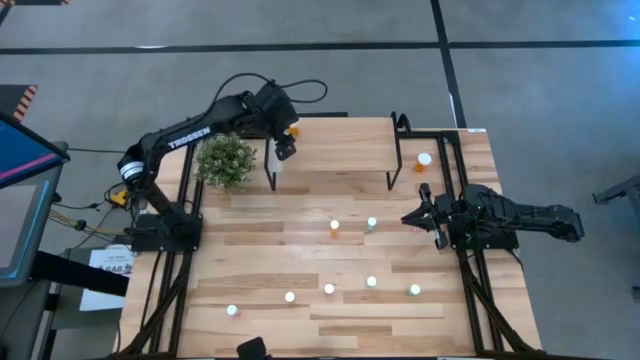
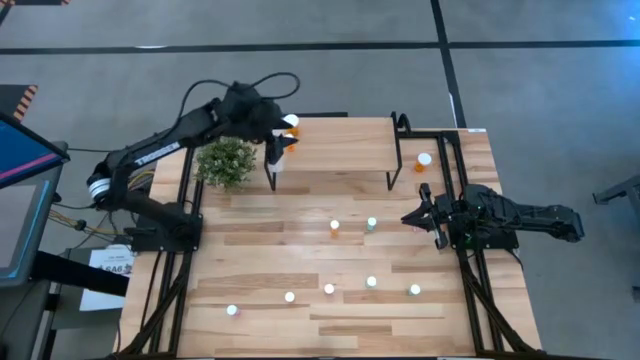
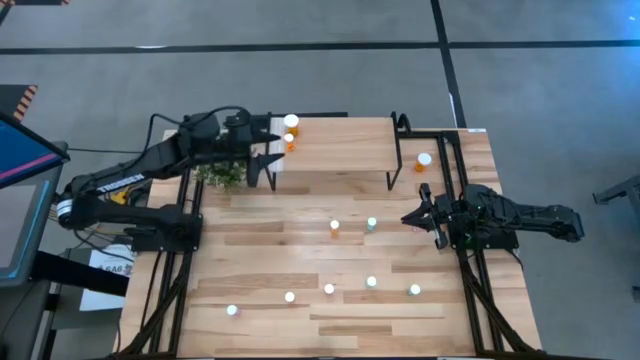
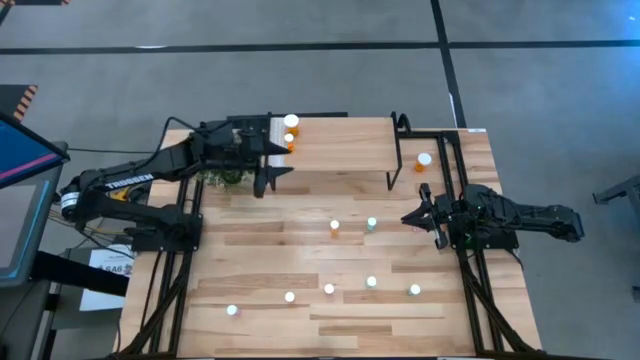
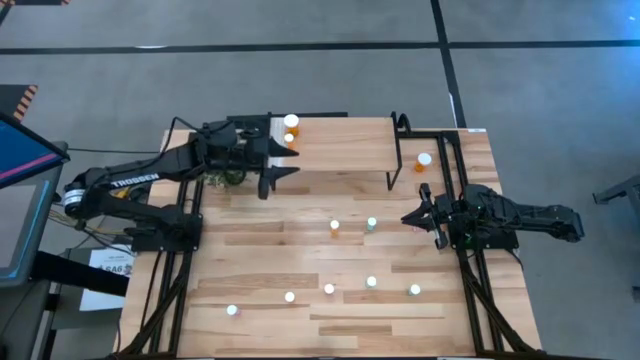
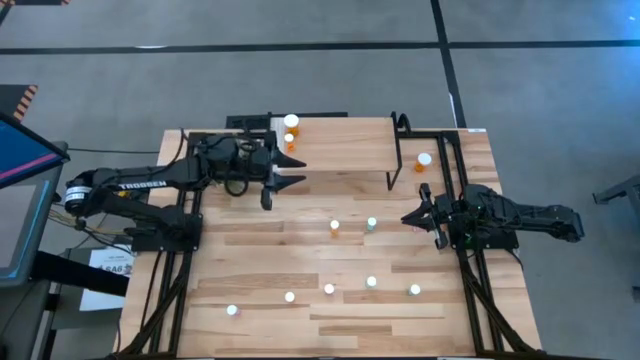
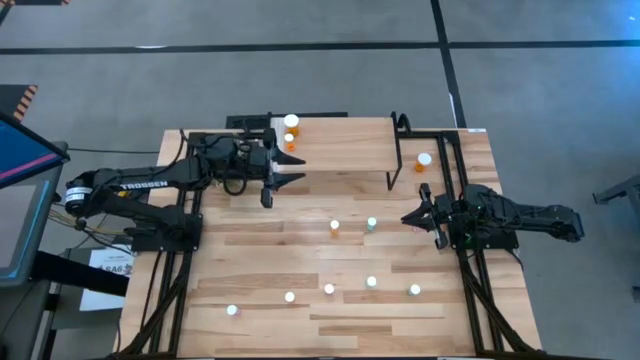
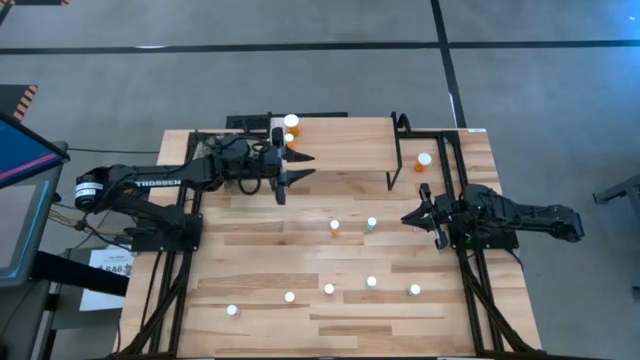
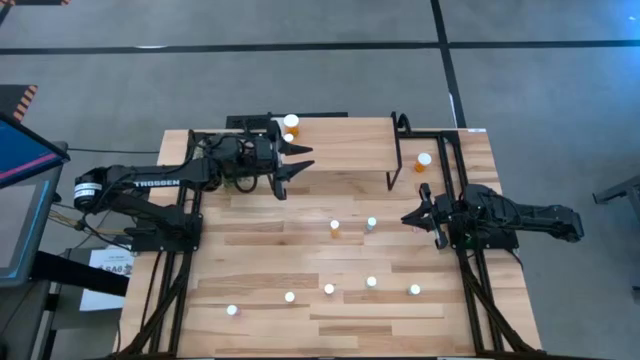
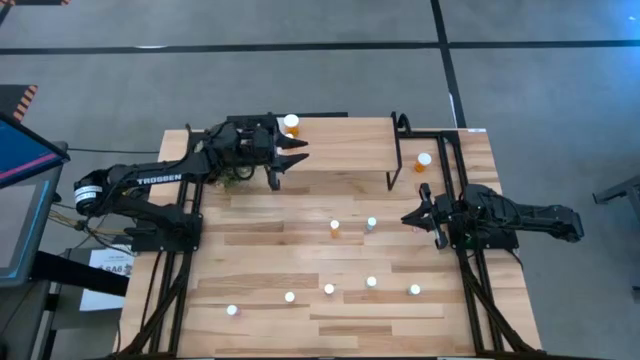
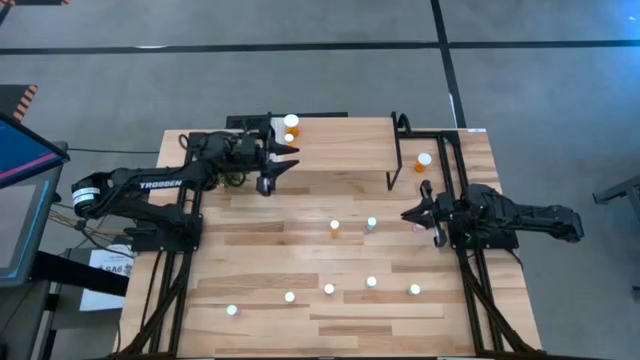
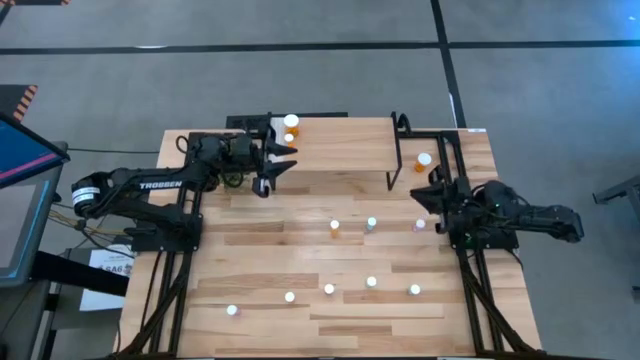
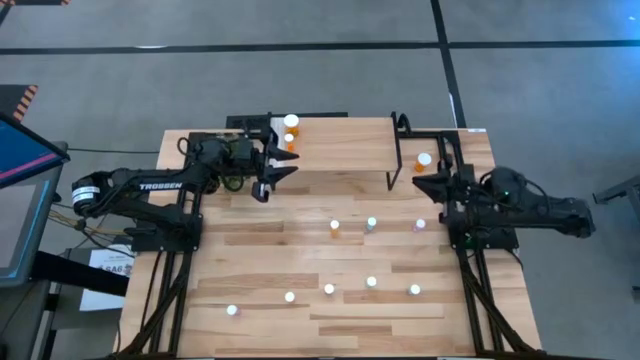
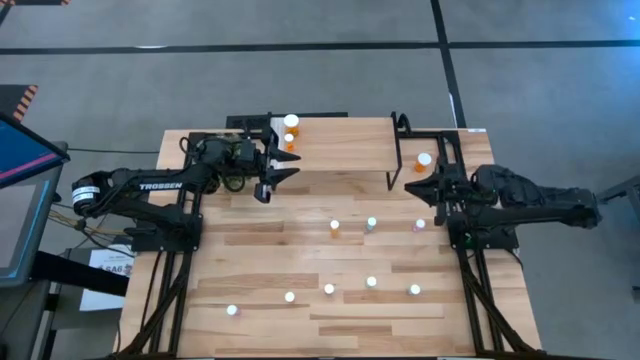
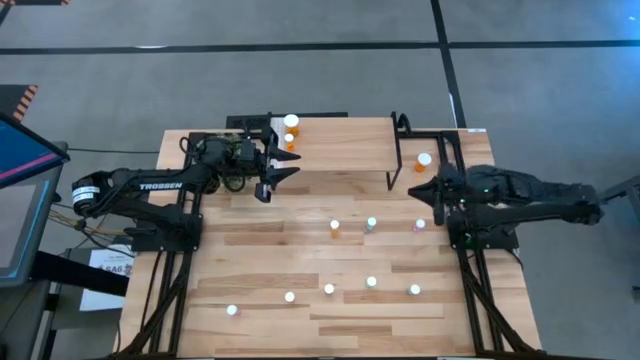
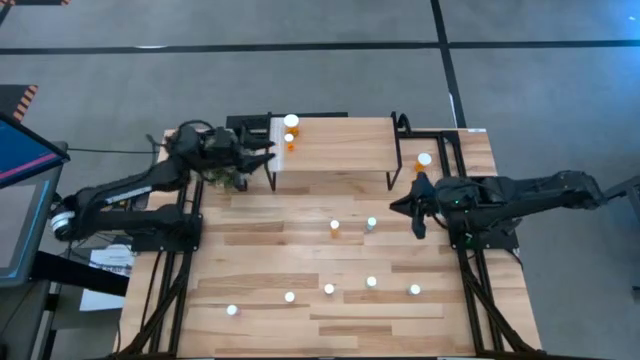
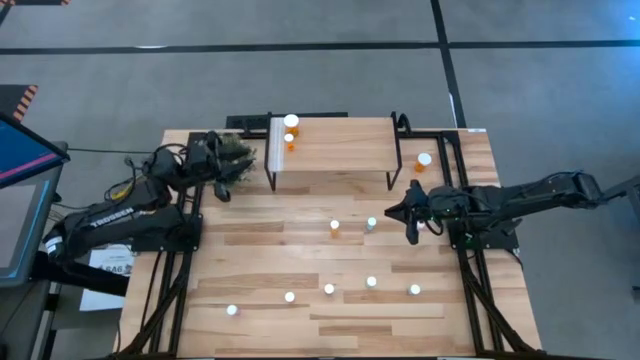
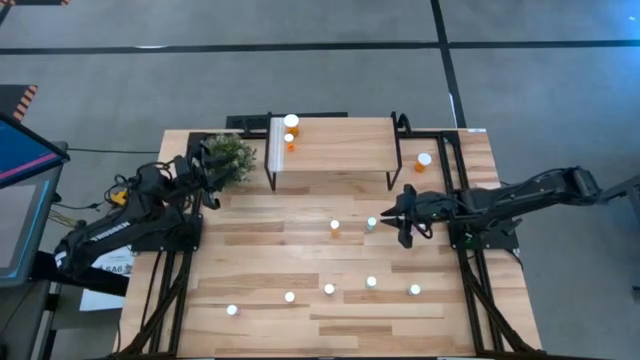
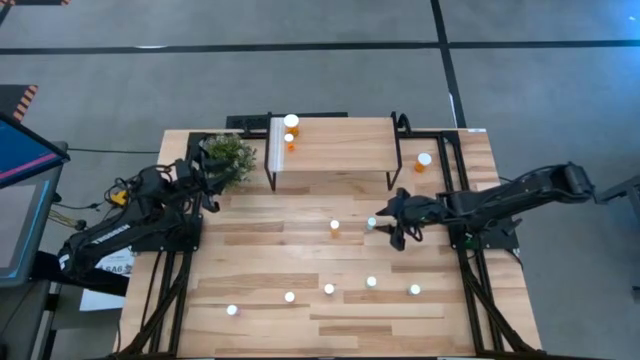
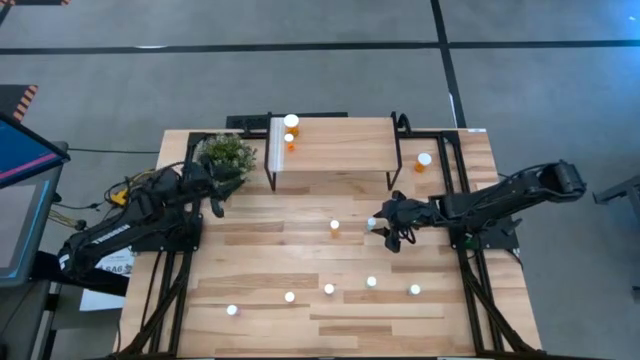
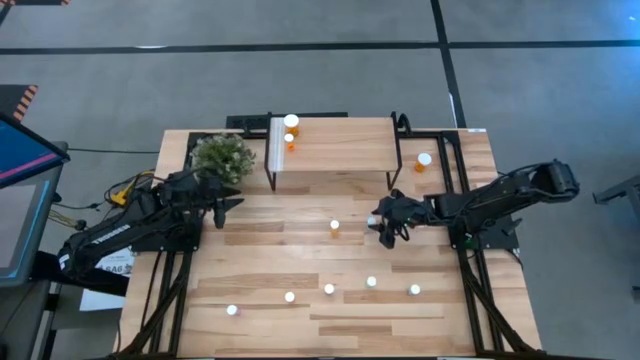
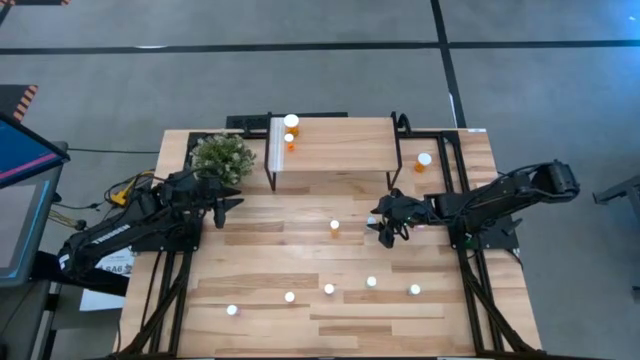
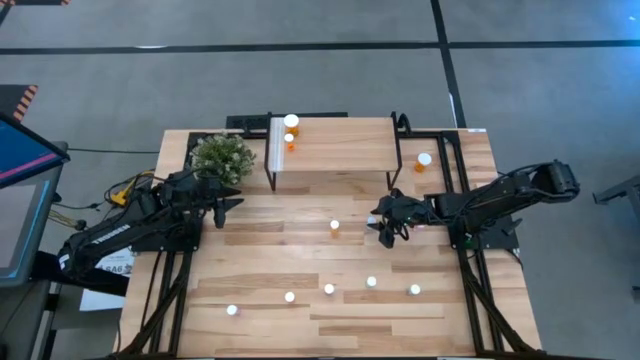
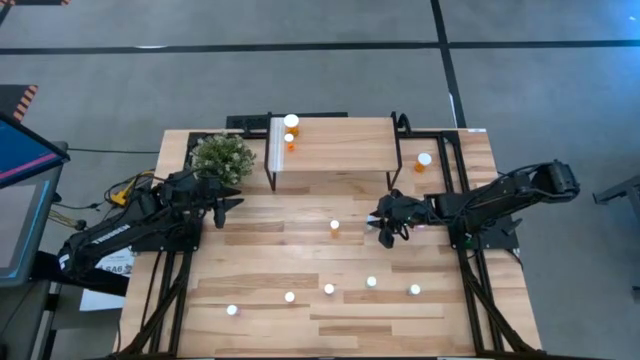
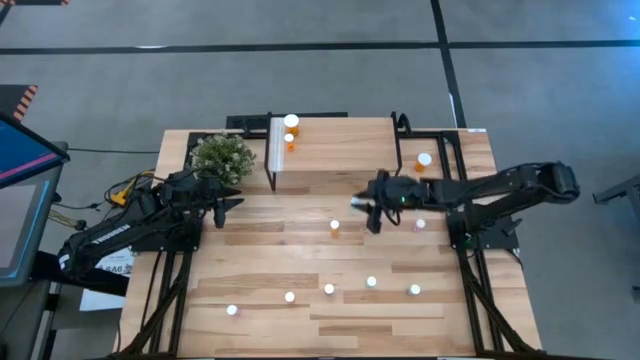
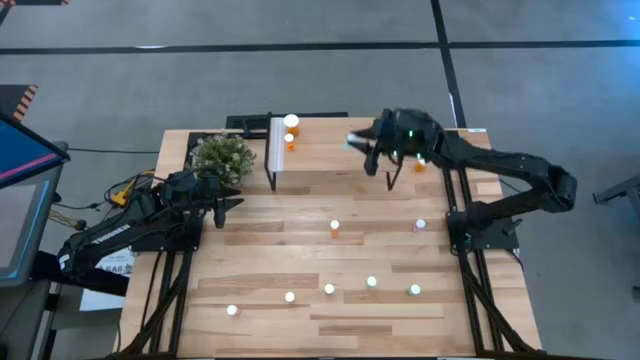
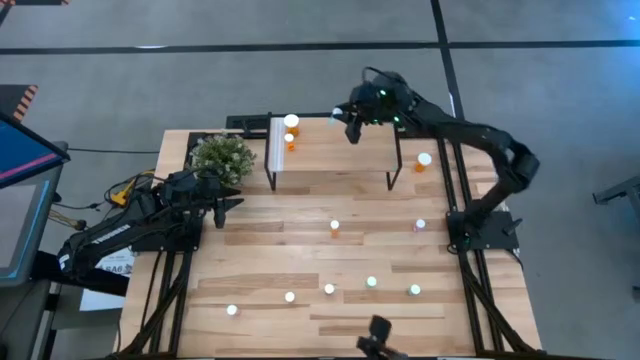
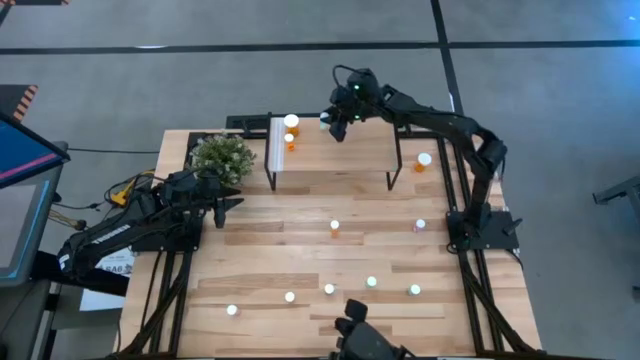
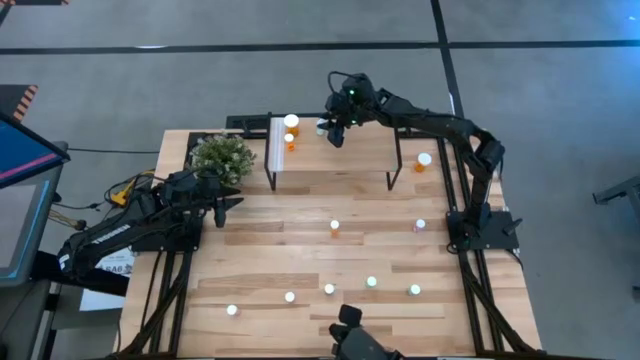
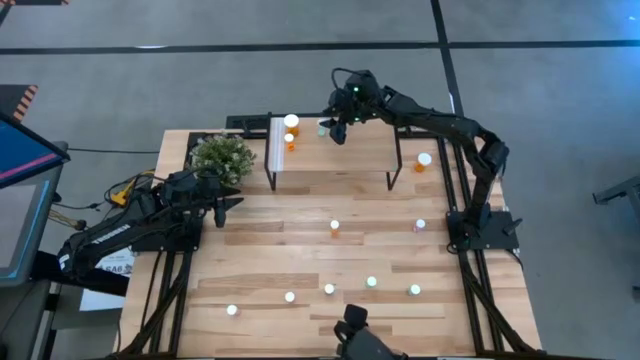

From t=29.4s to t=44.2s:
Task: Pick and place medicine bottles onto shelf by color
Put the small top blue pill bottle on the shelf

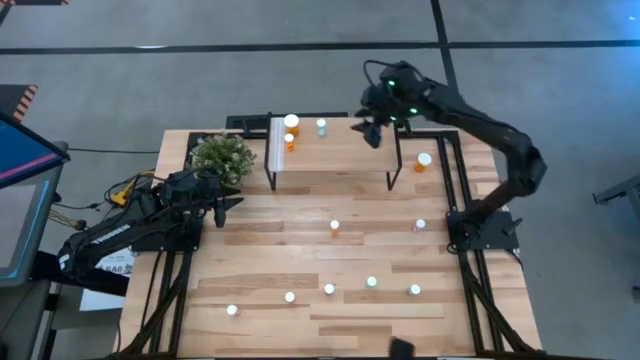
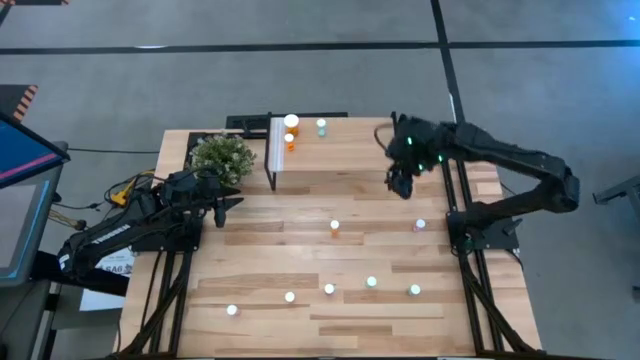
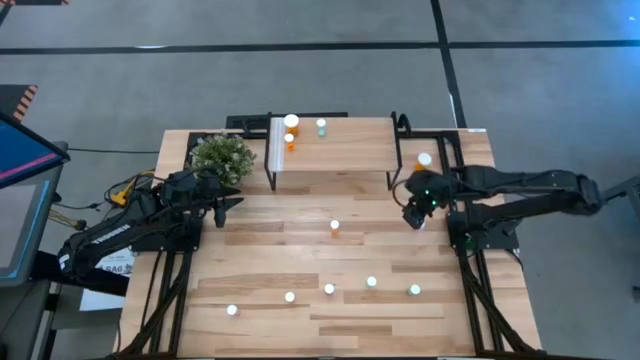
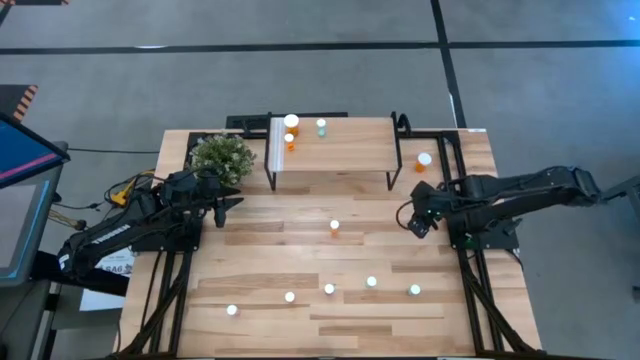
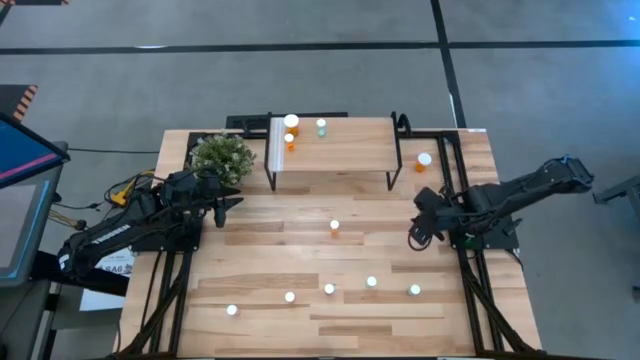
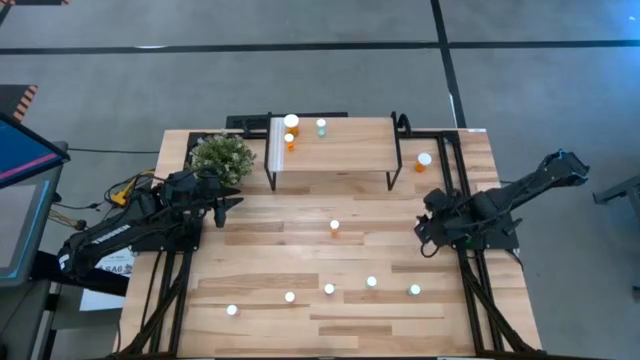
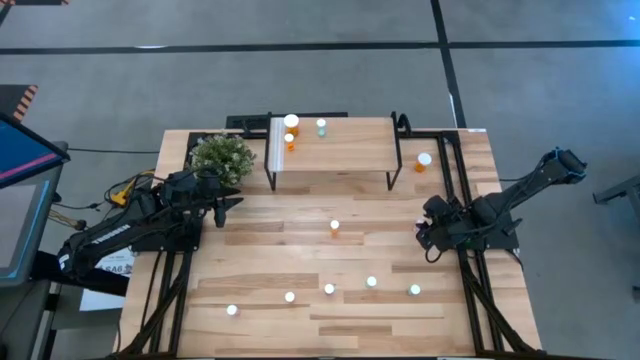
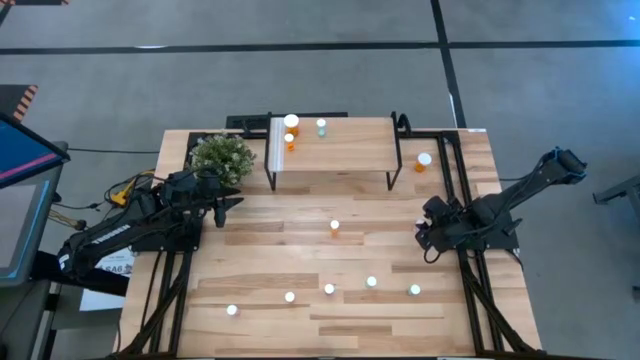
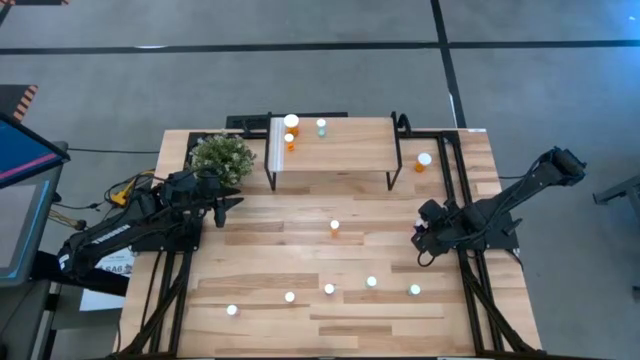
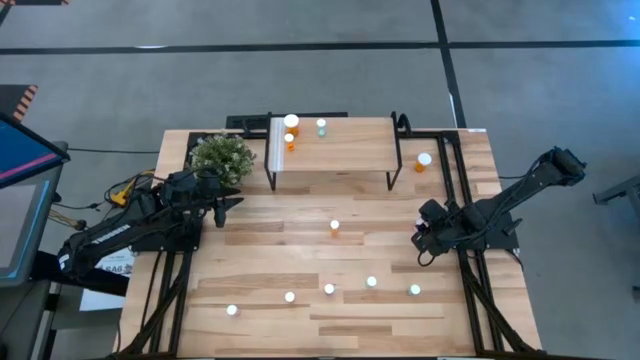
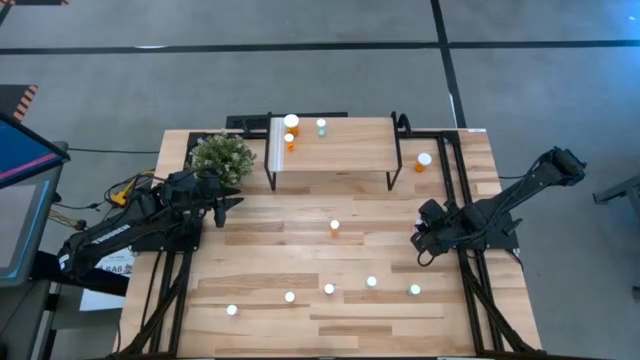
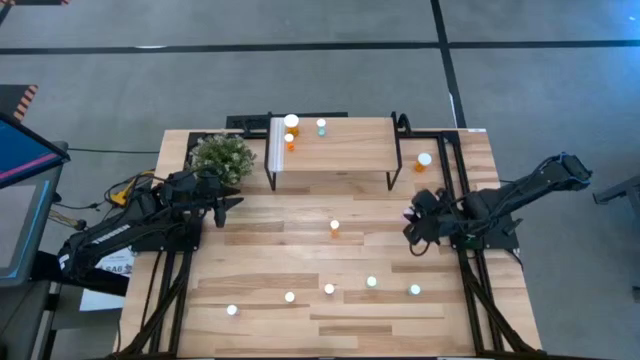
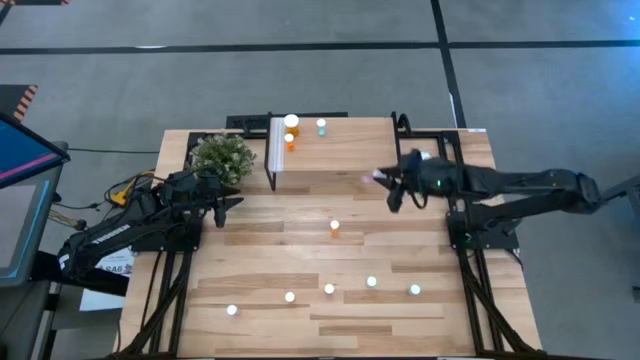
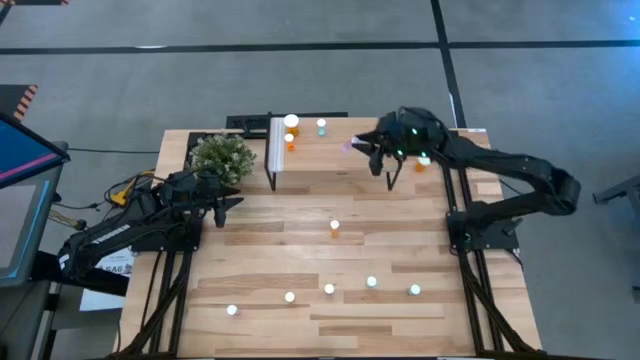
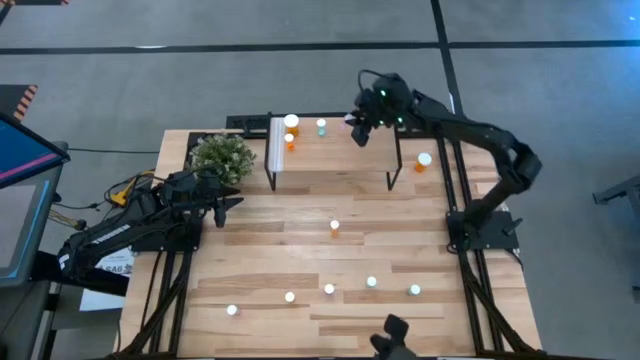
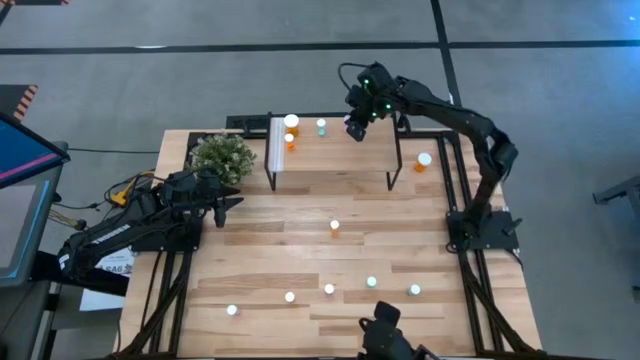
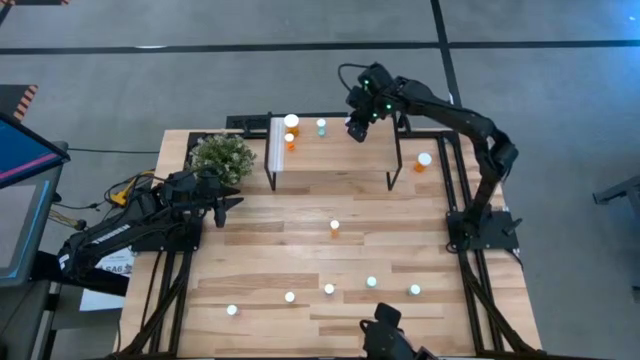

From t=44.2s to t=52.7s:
Put the small top pink pill bottle on the shelf
